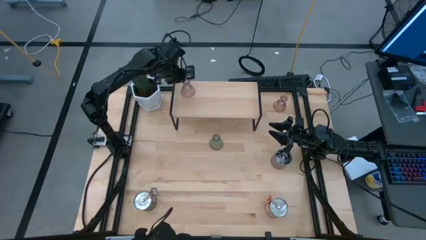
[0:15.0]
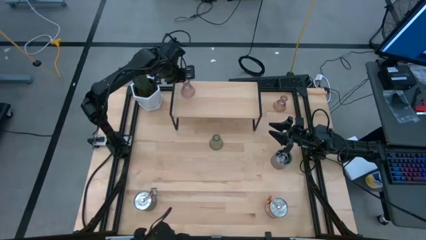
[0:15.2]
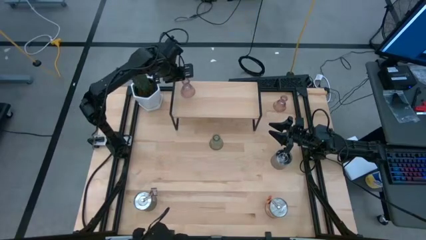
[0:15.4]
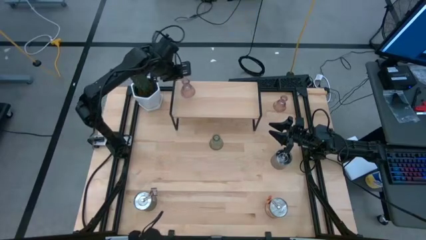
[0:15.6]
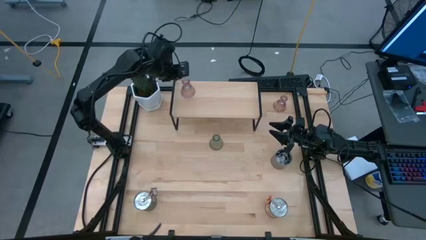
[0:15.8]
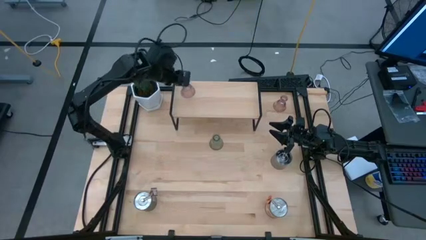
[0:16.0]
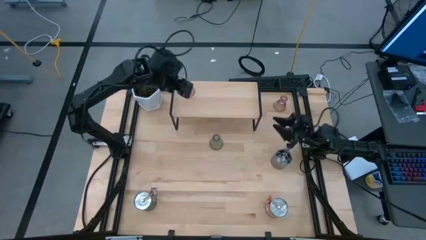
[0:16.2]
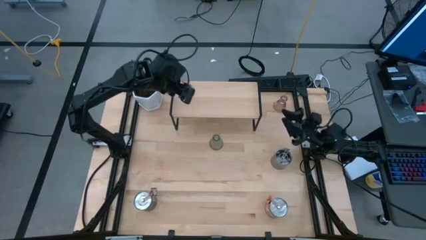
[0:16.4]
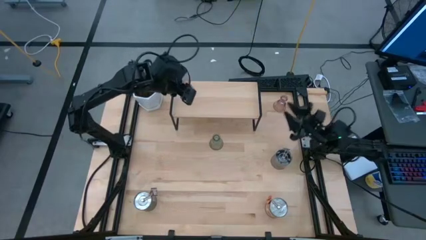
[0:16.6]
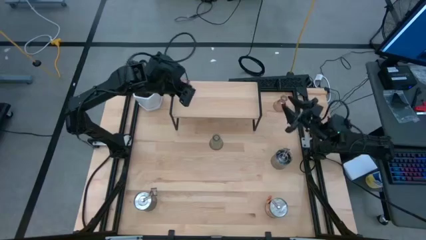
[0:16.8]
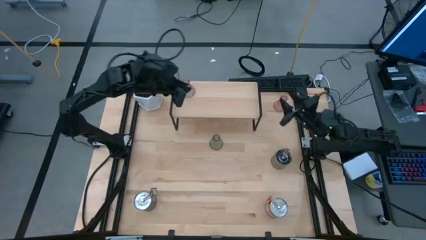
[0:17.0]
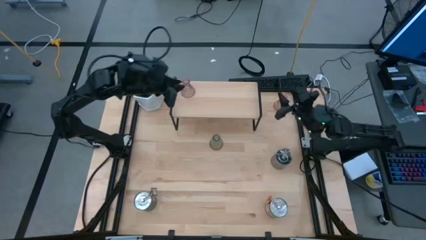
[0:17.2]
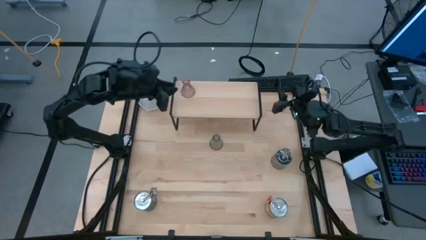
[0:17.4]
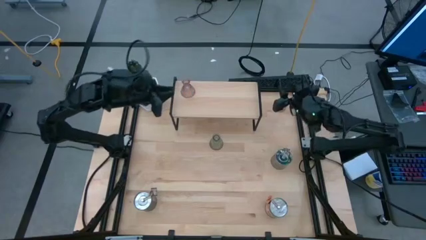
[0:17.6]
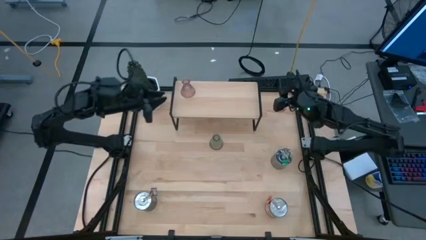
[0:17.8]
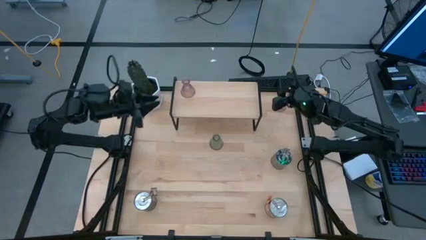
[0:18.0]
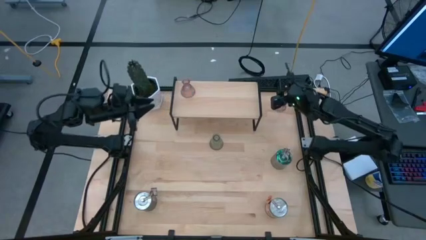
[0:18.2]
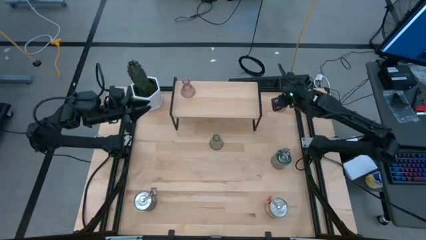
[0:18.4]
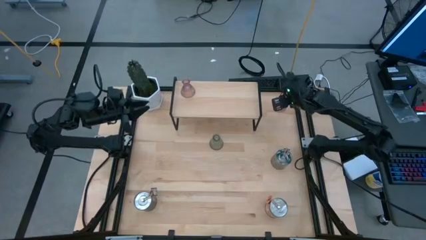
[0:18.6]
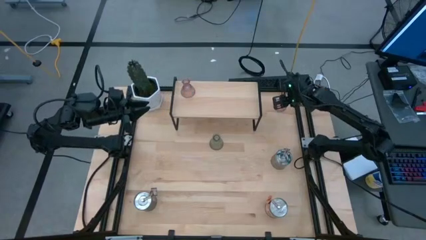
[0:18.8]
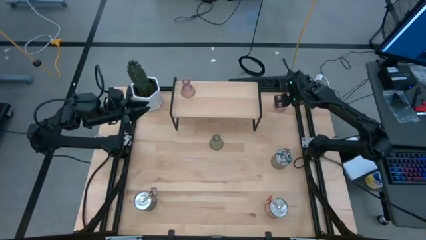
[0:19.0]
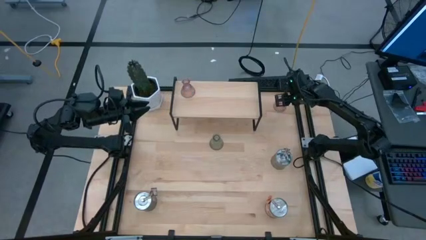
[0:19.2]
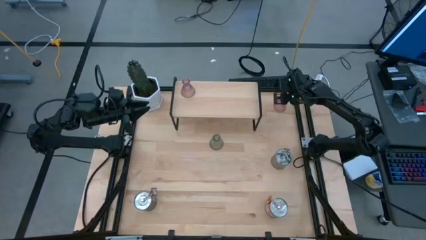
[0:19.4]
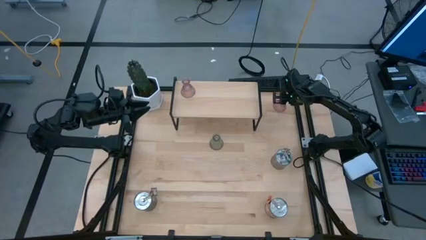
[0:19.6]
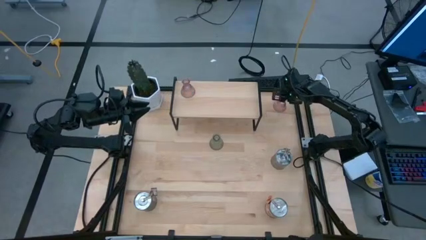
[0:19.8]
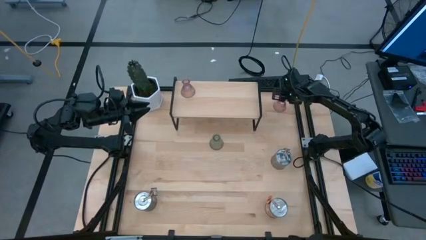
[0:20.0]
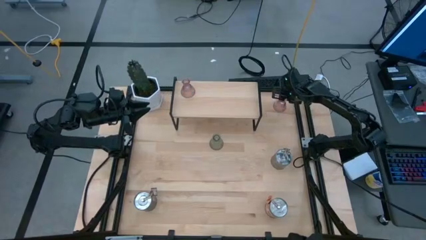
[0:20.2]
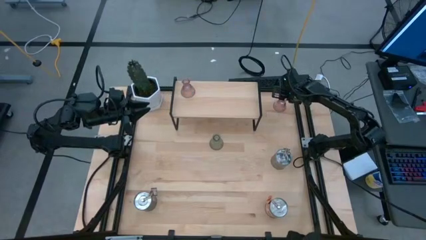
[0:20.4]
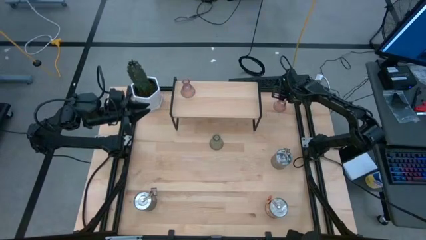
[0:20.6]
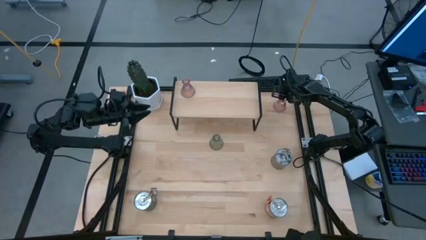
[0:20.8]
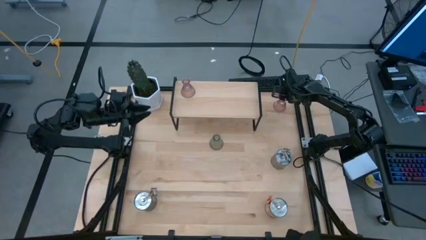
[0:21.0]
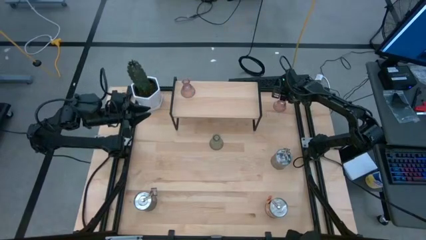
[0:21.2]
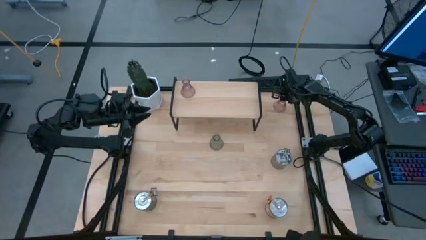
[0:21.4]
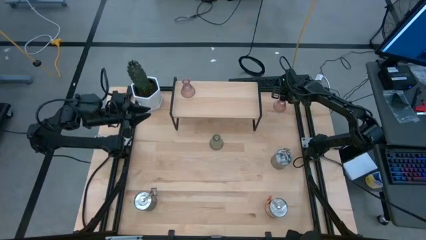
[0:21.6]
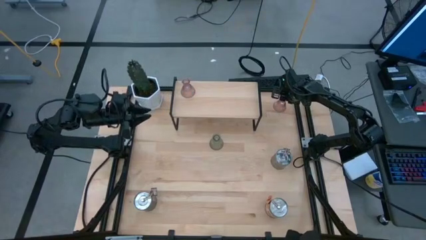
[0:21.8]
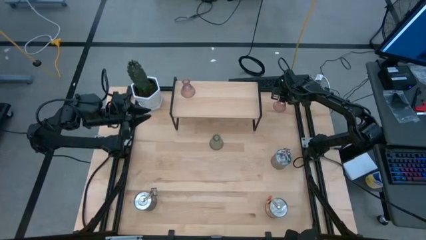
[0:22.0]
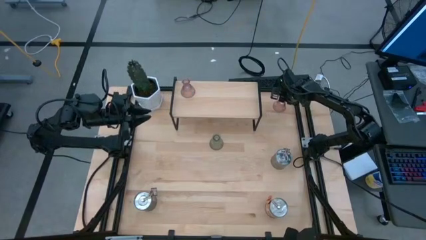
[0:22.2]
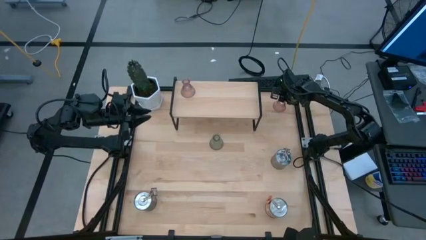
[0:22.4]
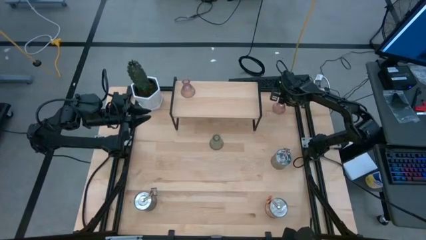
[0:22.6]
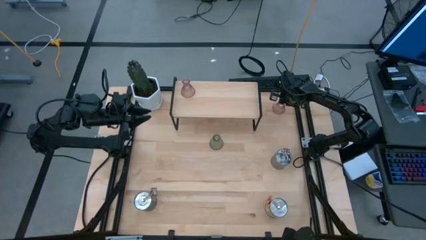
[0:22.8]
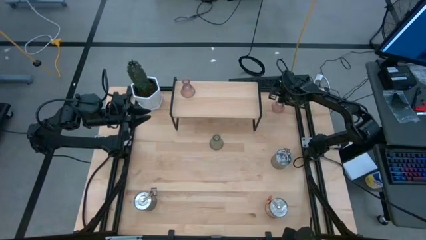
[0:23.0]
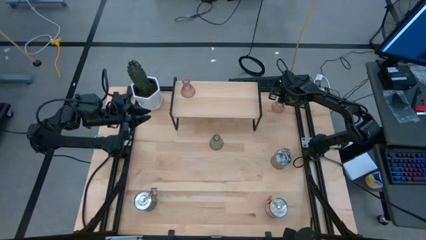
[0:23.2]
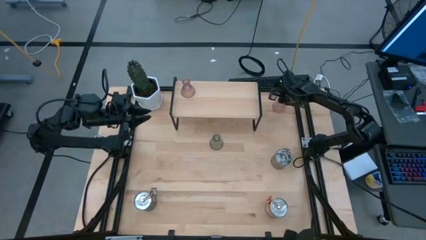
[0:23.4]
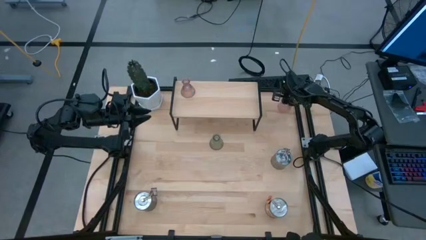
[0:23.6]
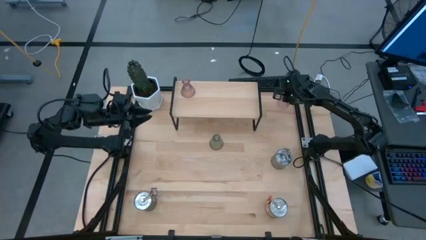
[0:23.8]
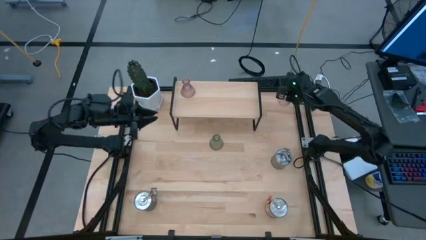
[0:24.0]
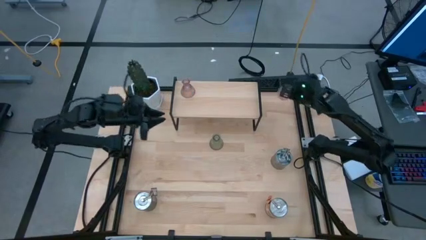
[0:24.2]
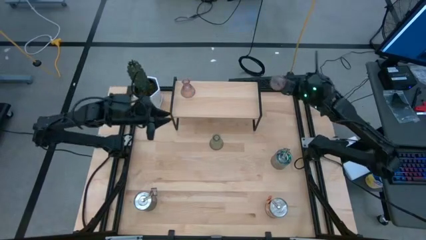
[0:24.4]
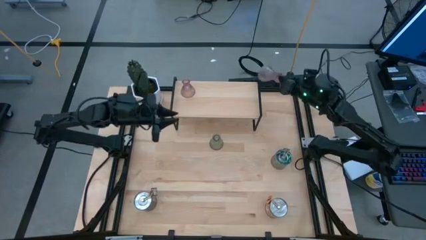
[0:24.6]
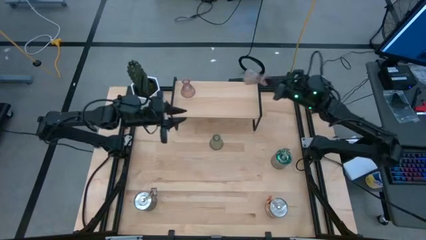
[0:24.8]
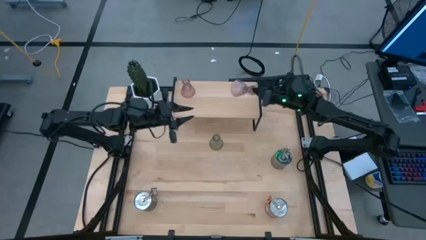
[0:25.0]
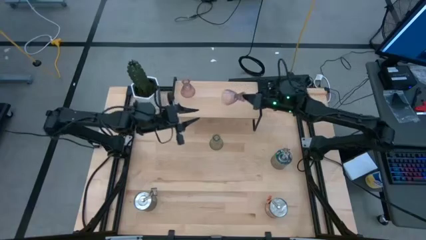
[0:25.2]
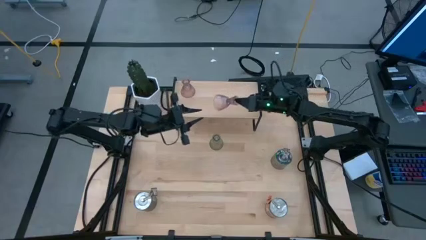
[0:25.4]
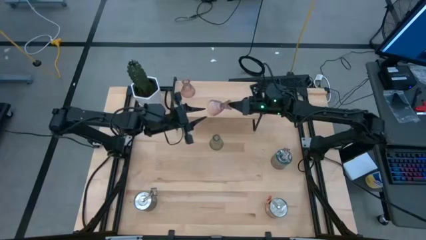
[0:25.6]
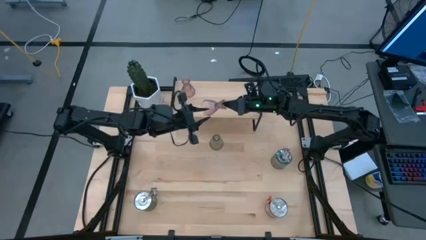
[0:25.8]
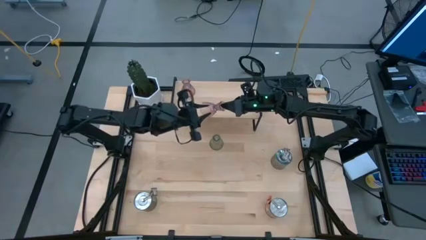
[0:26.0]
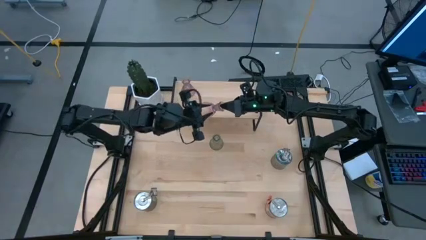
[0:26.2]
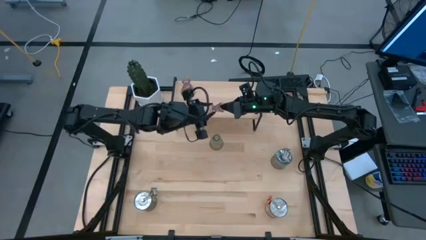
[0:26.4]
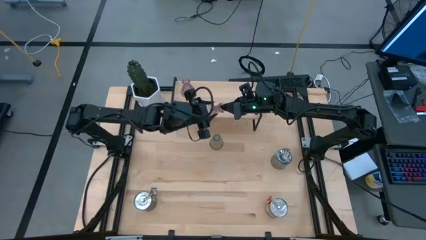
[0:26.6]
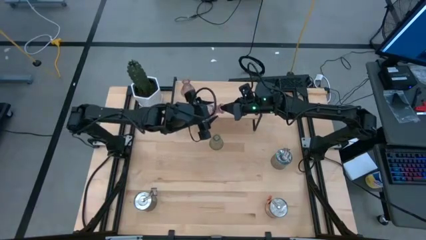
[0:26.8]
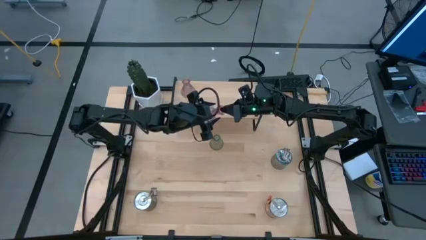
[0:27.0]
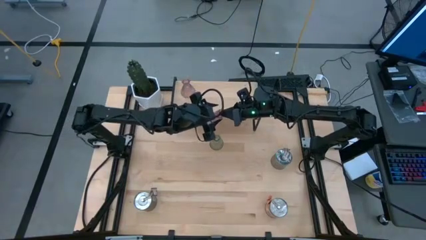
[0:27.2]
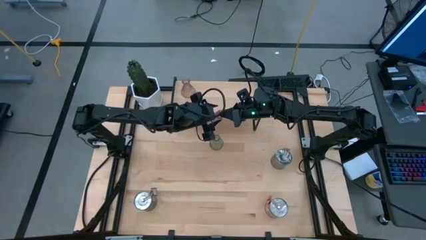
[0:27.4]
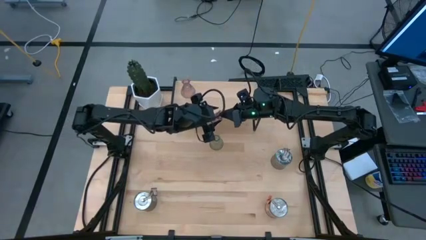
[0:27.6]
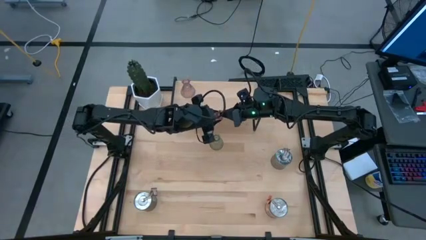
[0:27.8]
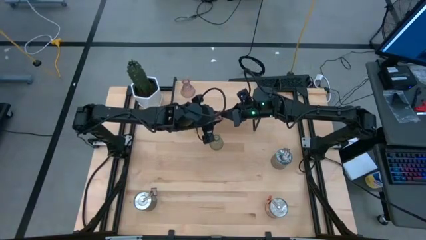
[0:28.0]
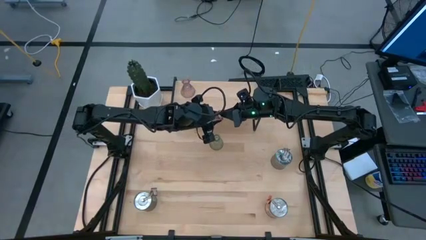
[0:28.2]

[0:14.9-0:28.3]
Task: Pick & Place candle stick holders
Put the pink candle holder on the shelf
